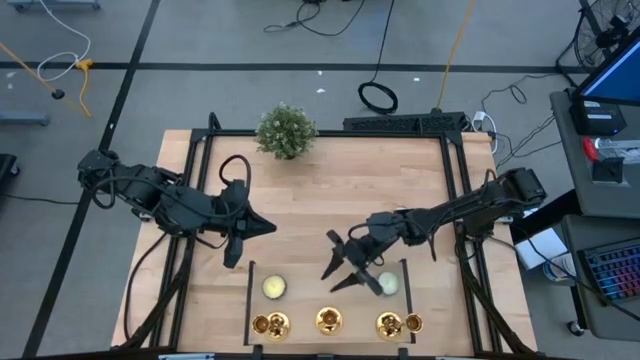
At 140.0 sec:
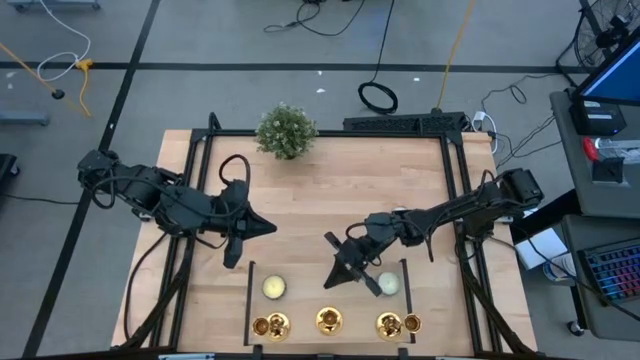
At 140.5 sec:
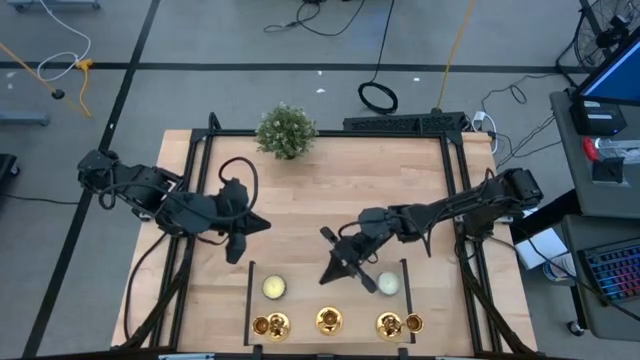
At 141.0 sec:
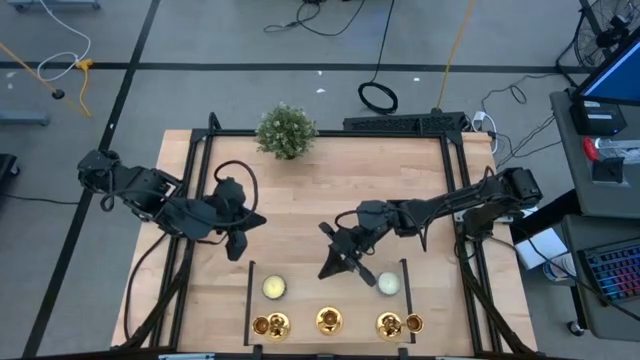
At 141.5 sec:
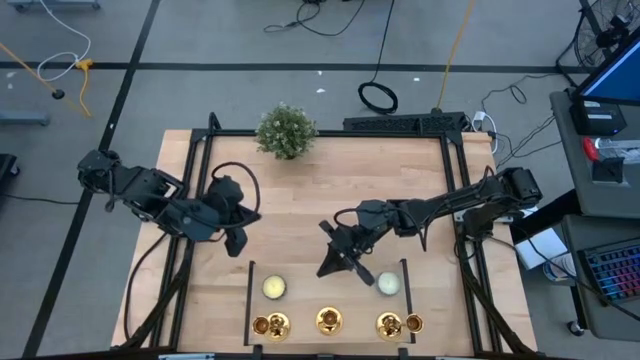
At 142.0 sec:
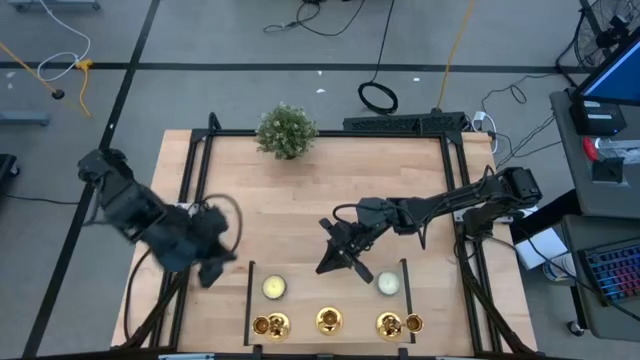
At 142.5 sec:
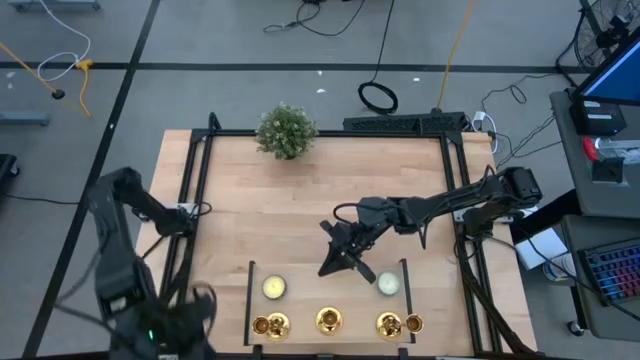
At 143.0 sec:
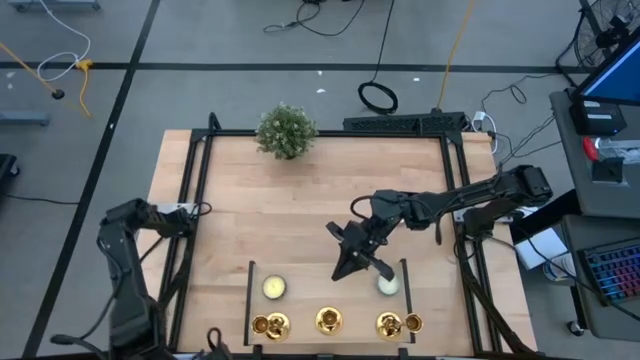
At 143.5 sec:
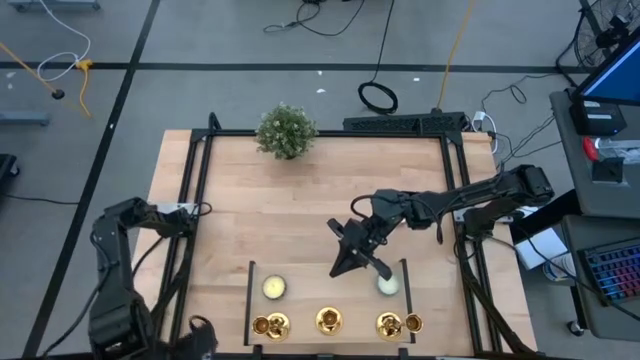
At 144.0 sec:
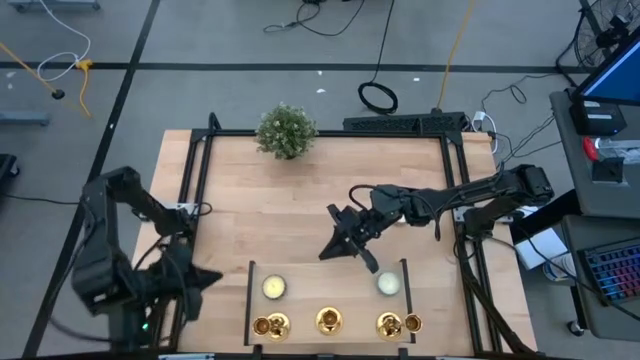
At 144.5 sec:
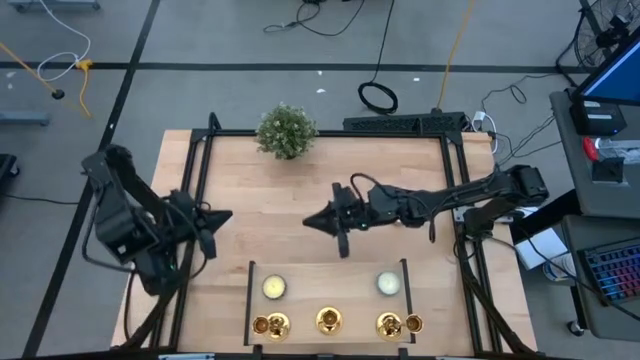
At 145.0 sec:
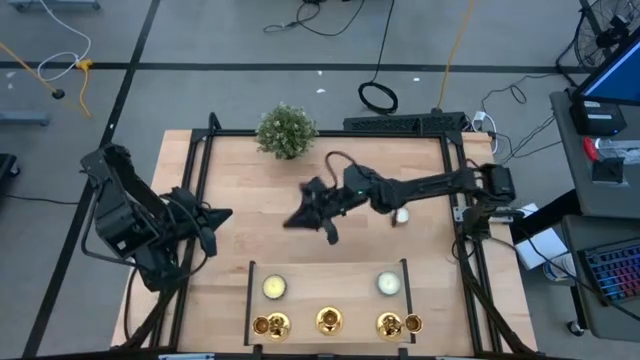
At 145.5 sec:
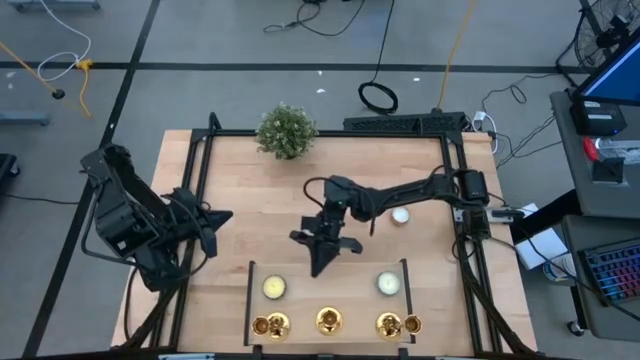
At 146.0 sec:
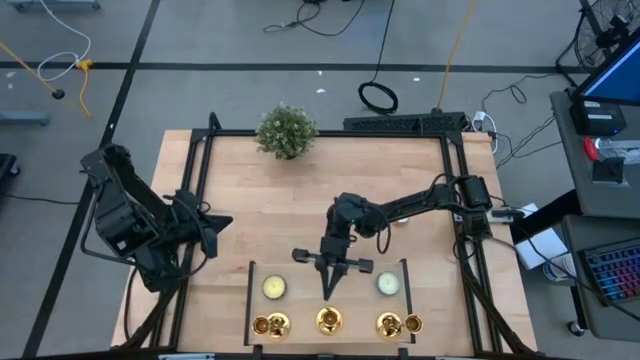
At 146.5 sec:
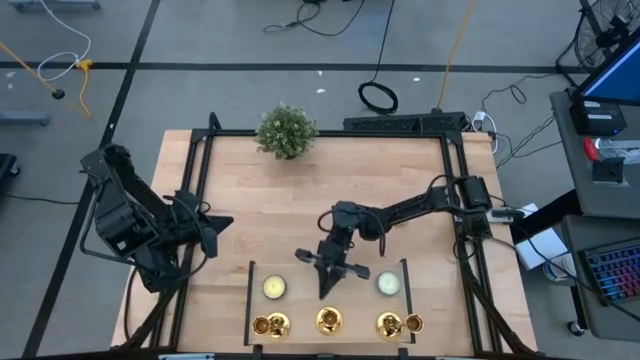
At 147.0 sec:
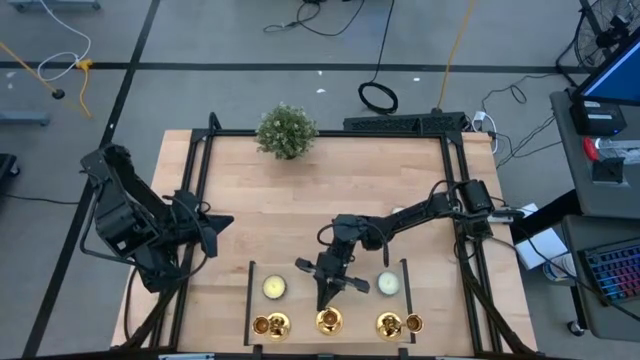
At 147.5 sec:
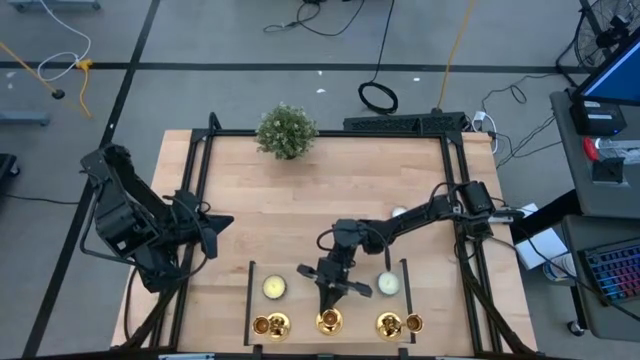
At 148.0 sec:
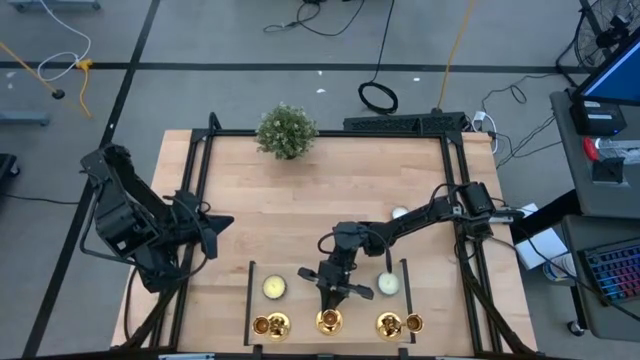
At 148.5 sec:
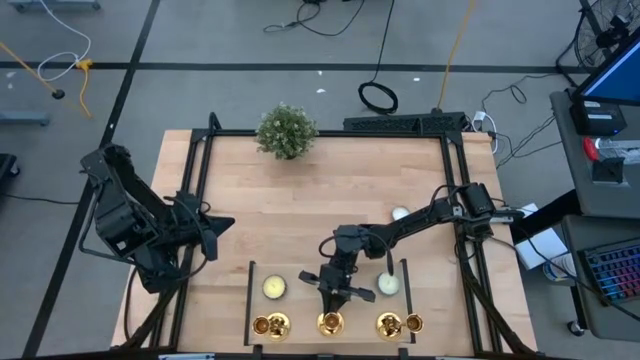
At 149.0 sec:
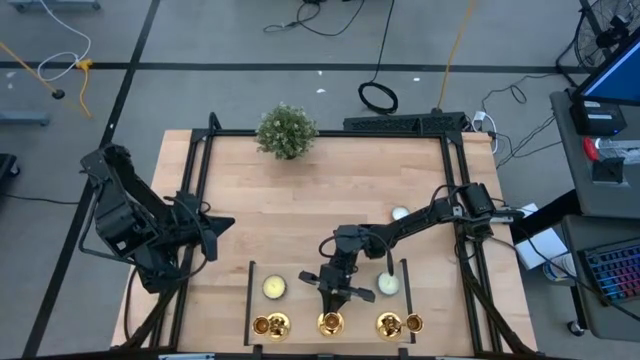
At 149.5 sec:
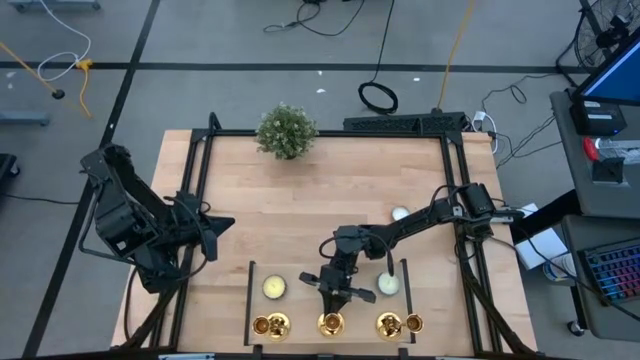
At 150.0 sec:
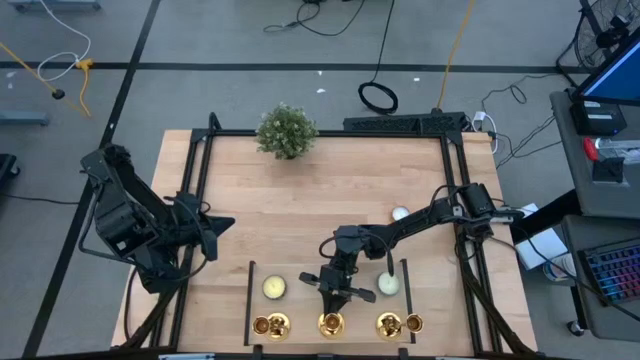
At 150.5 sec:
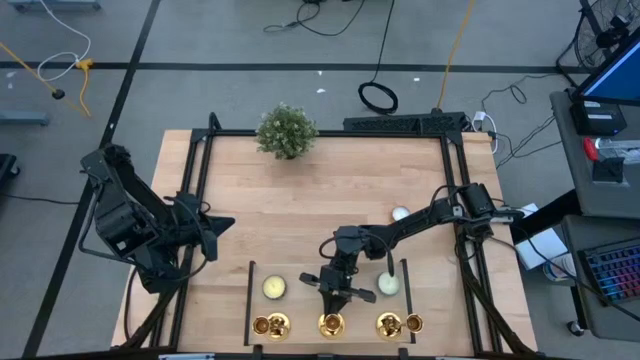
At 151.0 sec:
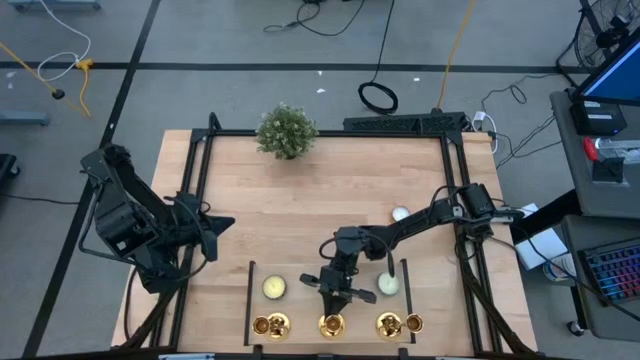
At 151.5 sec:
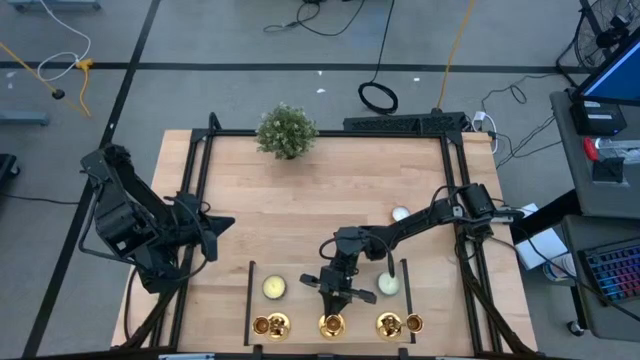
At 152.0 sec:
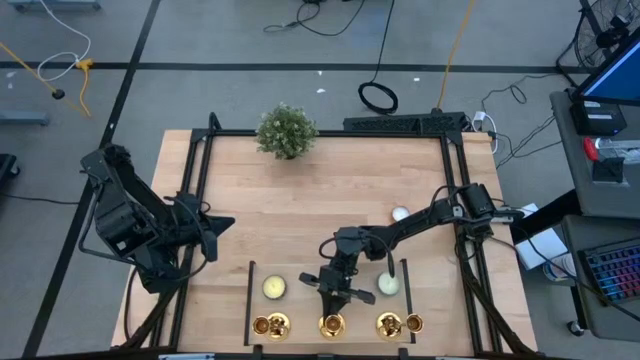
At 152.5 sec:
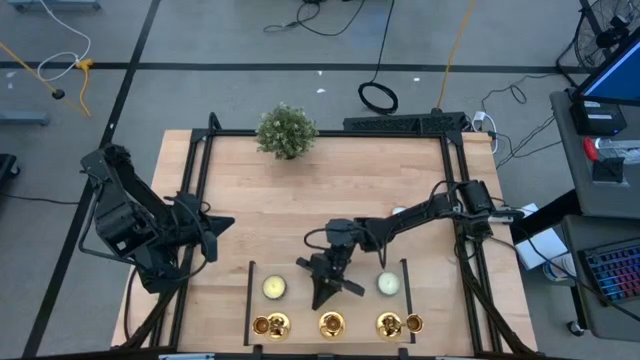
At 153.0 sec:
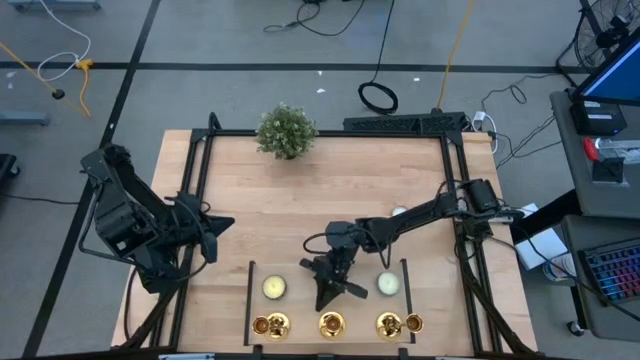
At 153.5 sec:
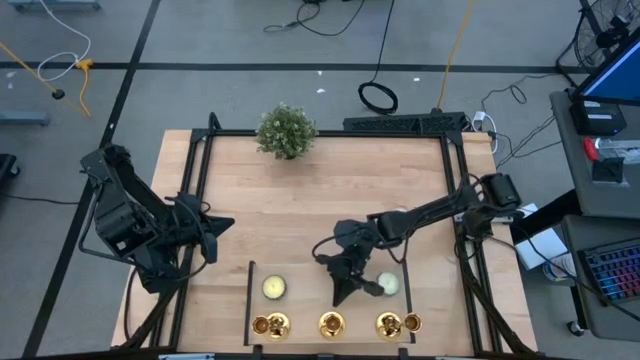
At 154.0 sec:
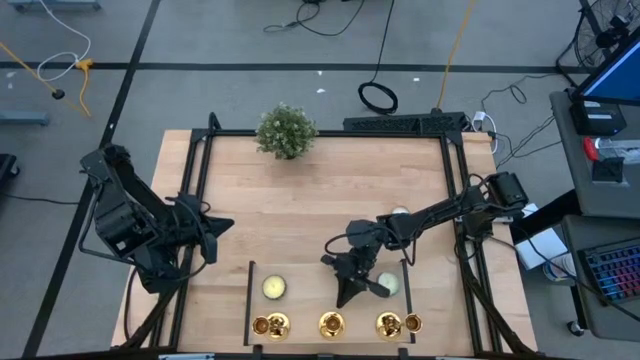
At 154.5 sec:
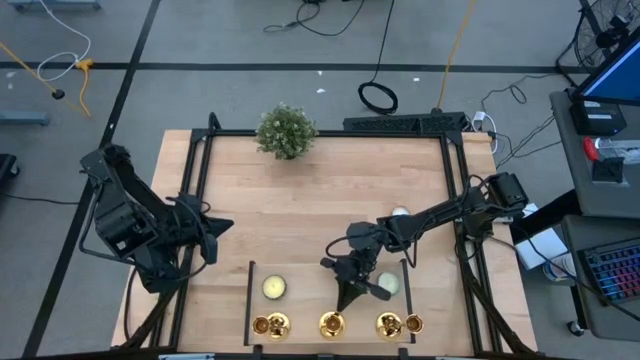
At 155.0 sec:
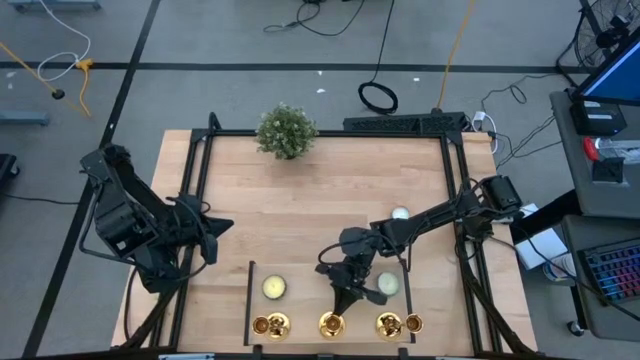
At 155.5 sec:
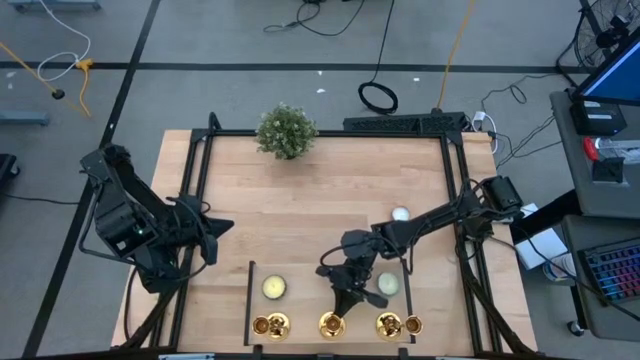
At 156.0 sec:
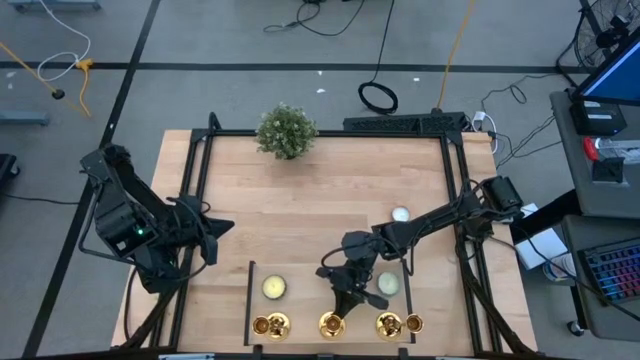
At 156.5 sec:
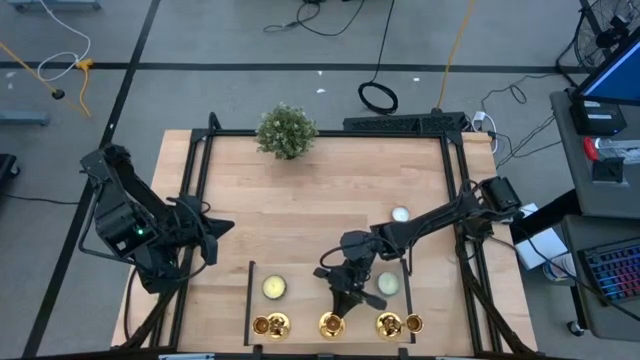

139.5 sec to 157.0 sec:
Task: Pick & Place candle stick holders
Put the gold candle holder on the shelf

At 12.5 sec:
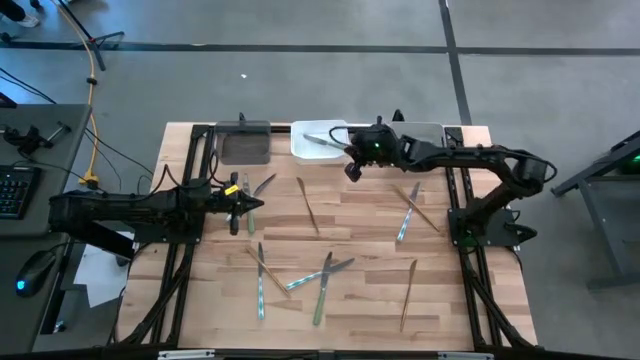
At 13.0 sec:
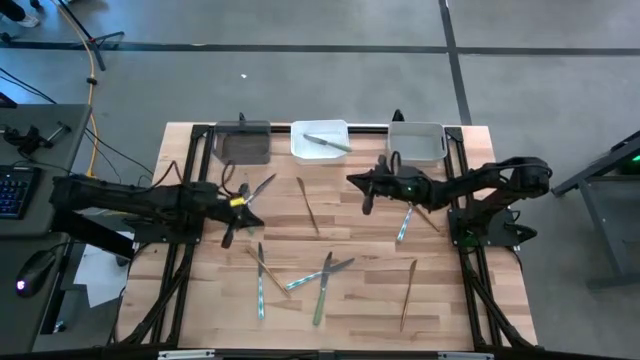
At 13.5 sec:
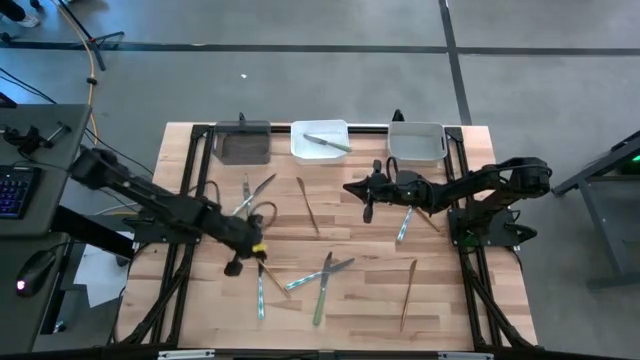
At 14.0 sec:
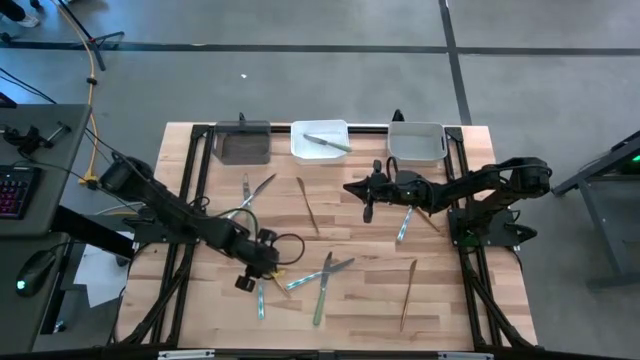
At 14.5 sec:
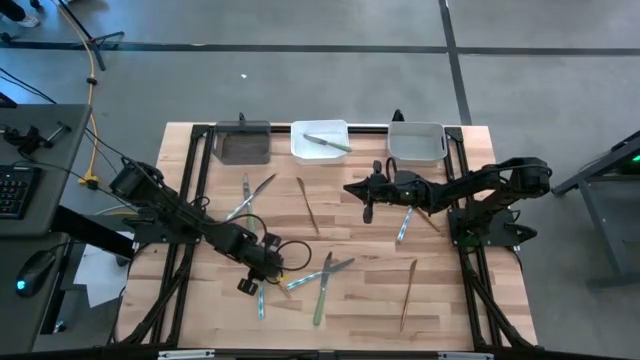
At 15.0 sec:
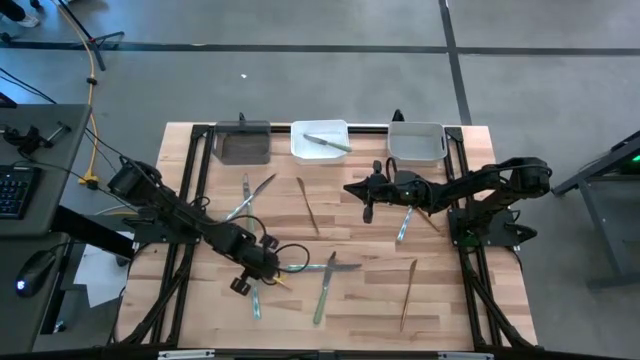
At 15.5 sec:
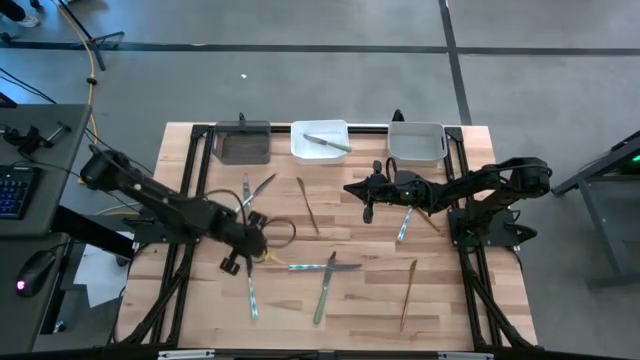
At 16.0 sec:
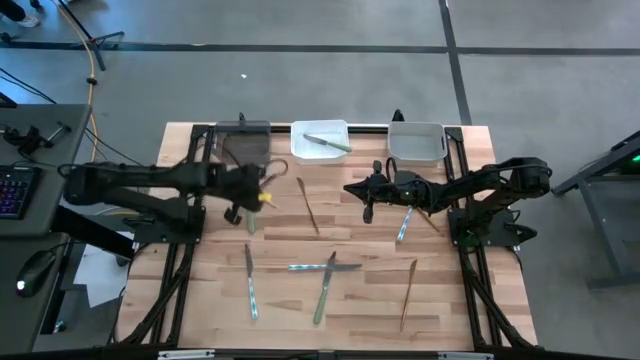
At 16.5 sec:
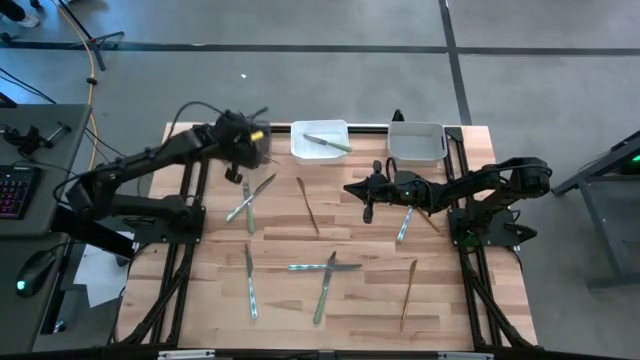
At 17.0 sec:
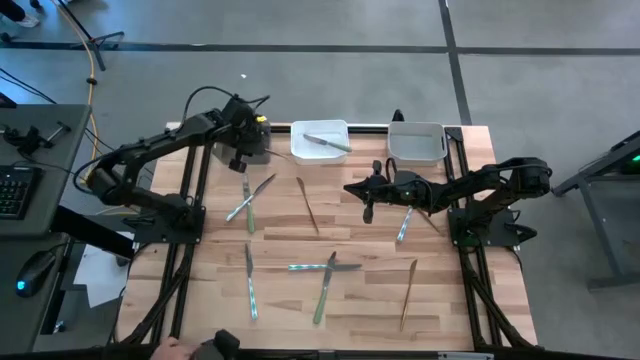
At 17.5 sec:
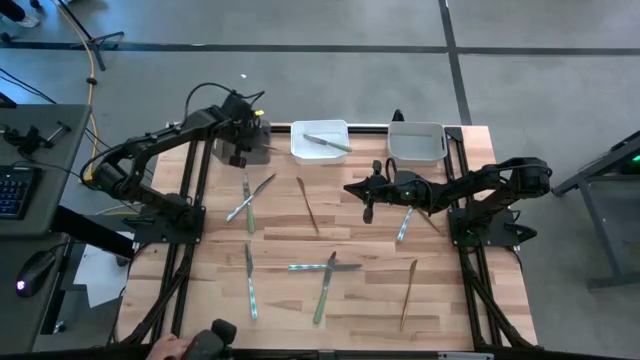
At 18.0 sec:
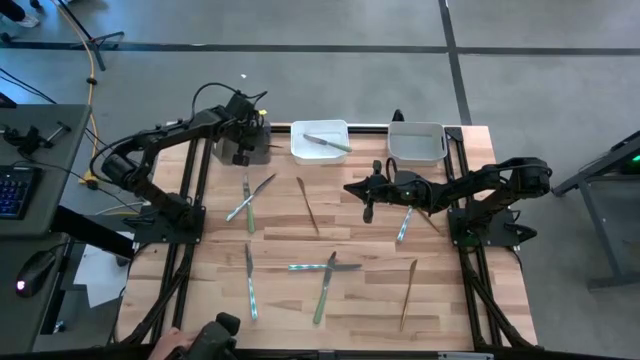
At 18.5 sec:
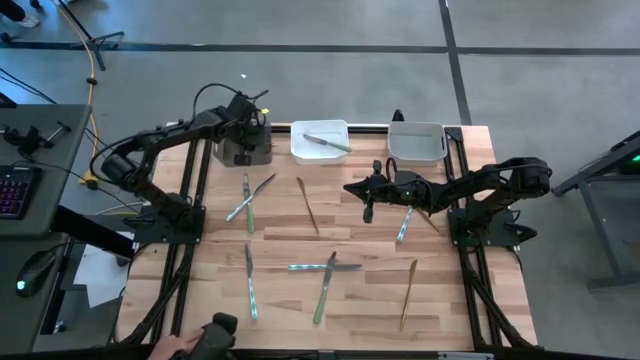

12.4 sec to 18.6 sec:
Task: Sort silverware by color (type)
Put the gold knife into black bin
